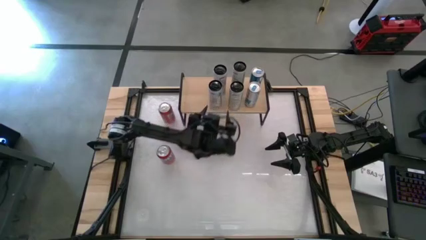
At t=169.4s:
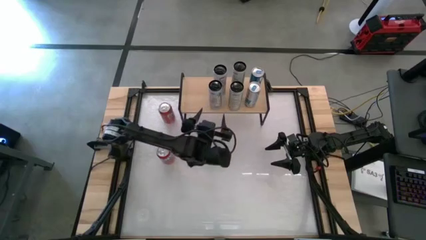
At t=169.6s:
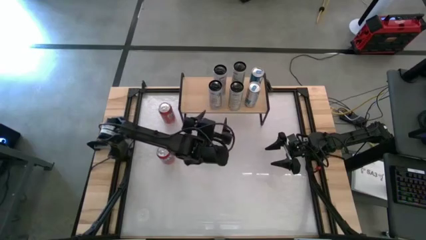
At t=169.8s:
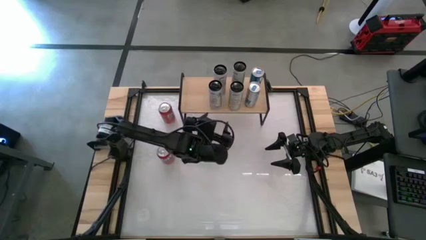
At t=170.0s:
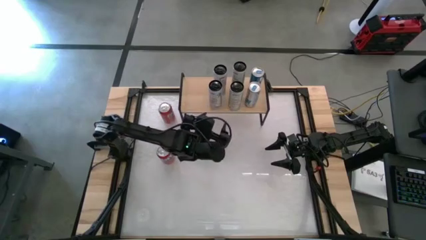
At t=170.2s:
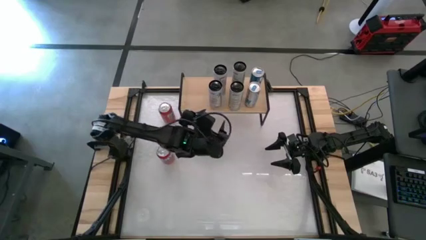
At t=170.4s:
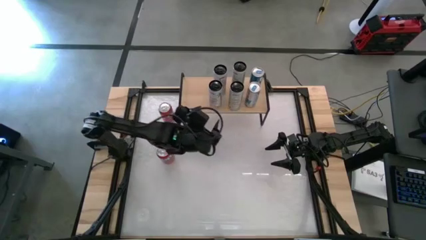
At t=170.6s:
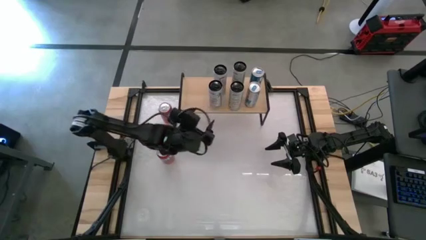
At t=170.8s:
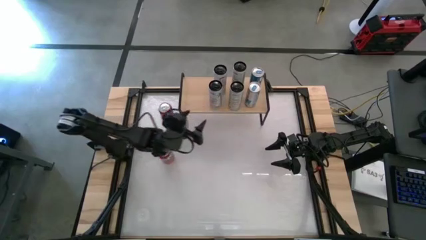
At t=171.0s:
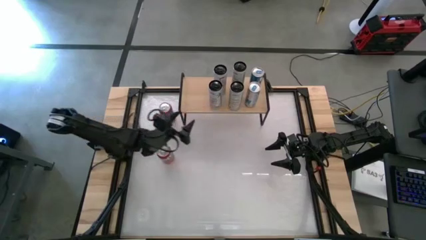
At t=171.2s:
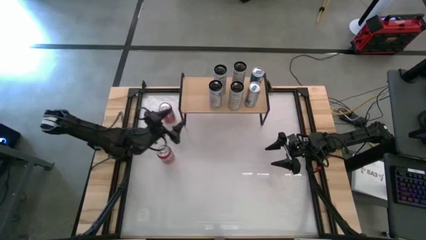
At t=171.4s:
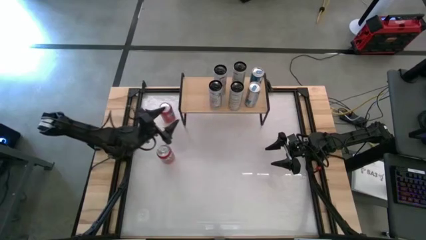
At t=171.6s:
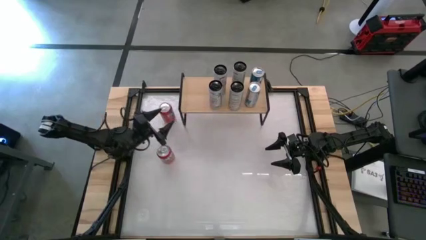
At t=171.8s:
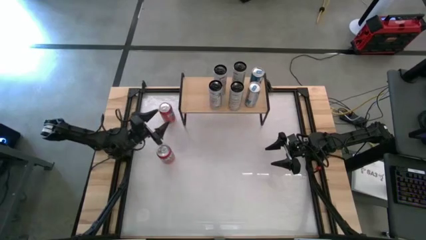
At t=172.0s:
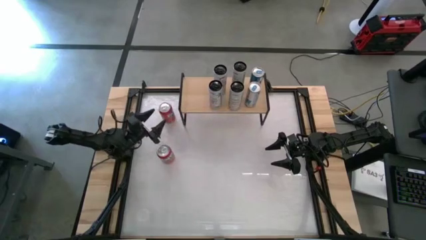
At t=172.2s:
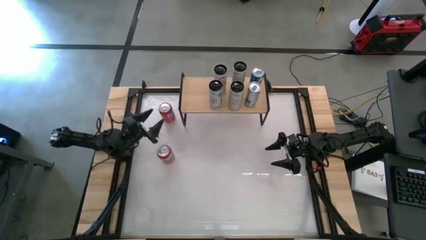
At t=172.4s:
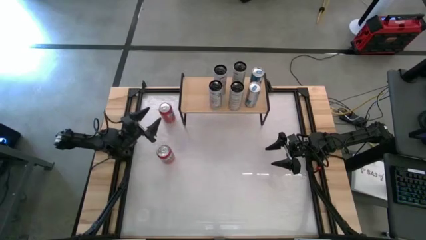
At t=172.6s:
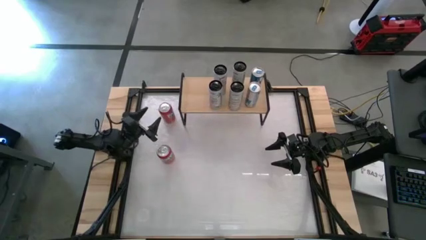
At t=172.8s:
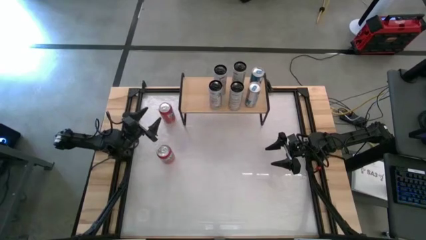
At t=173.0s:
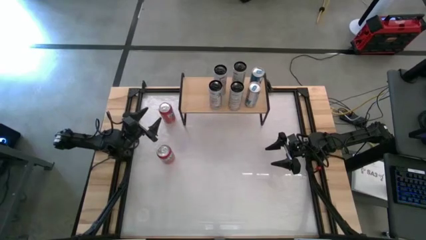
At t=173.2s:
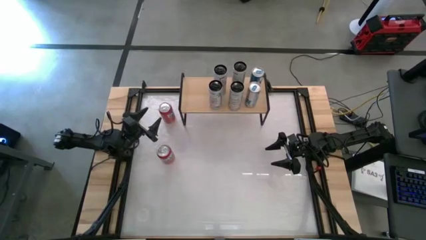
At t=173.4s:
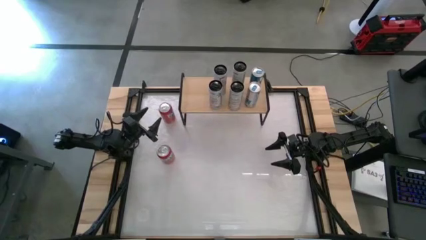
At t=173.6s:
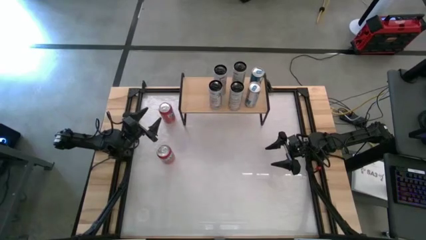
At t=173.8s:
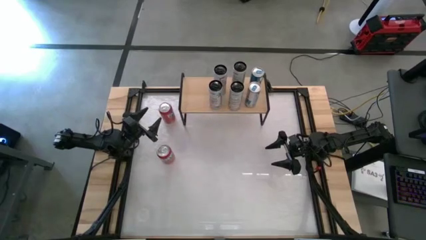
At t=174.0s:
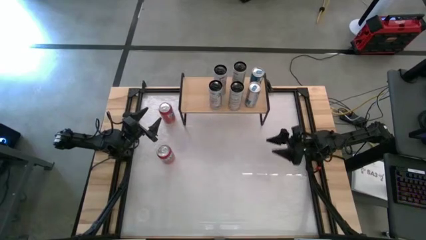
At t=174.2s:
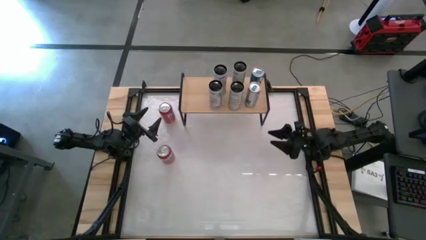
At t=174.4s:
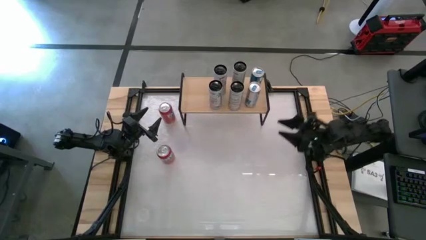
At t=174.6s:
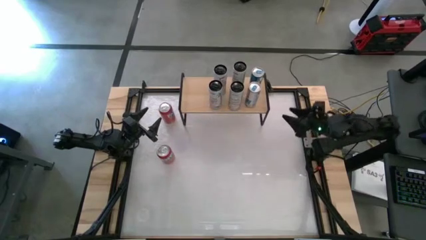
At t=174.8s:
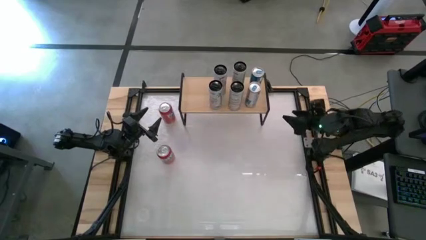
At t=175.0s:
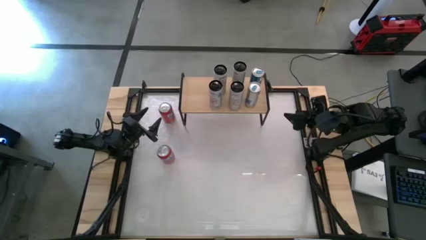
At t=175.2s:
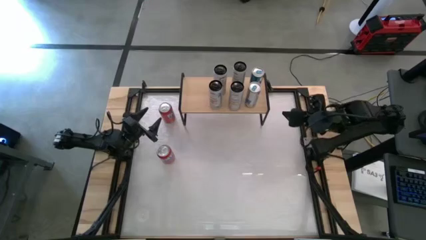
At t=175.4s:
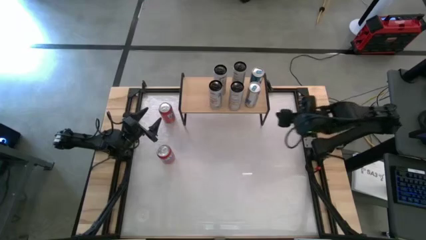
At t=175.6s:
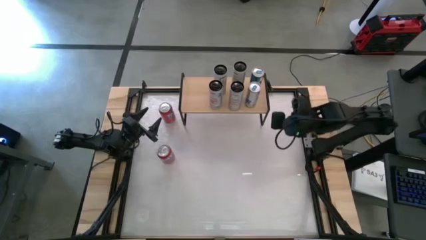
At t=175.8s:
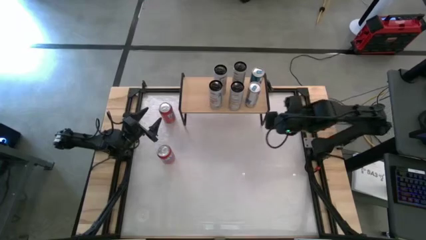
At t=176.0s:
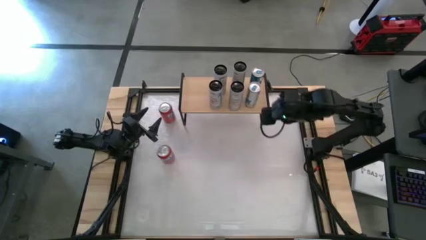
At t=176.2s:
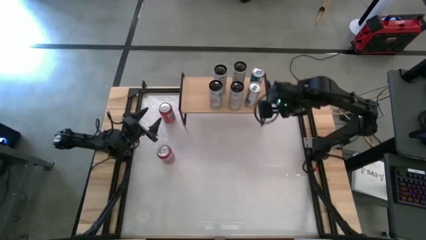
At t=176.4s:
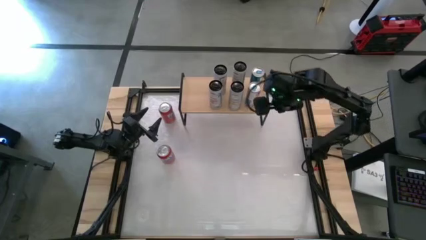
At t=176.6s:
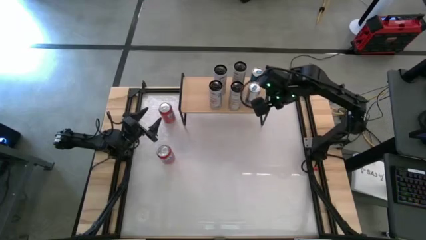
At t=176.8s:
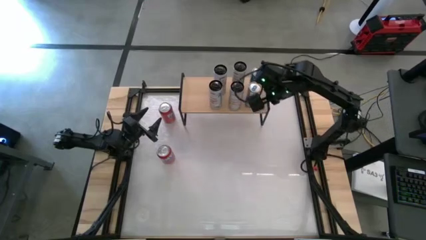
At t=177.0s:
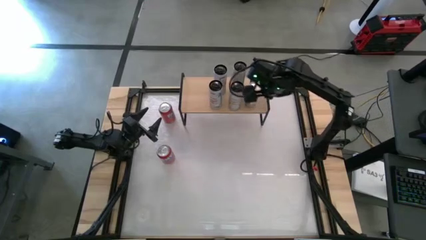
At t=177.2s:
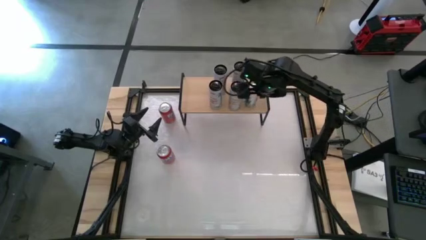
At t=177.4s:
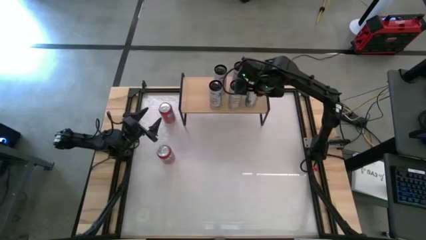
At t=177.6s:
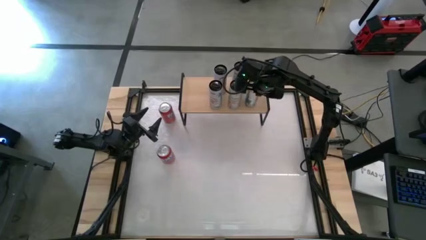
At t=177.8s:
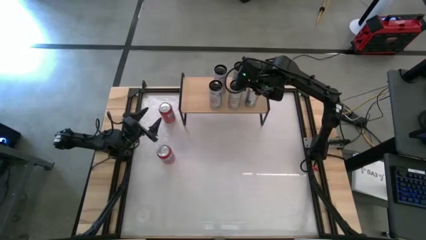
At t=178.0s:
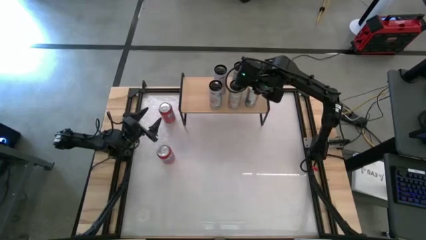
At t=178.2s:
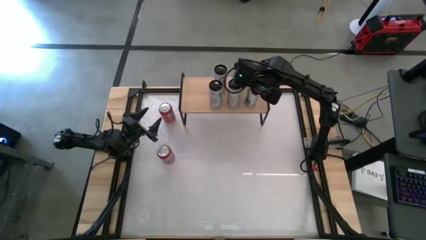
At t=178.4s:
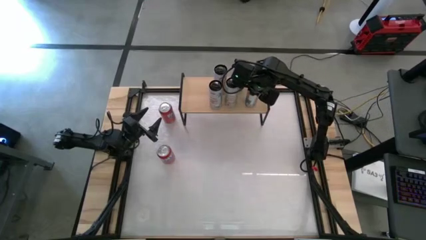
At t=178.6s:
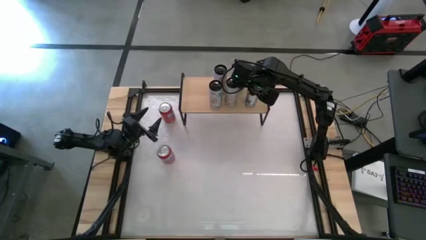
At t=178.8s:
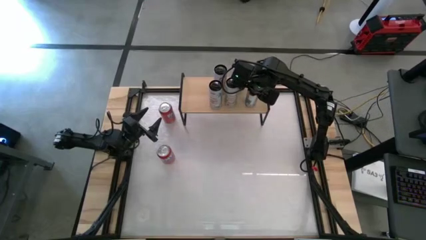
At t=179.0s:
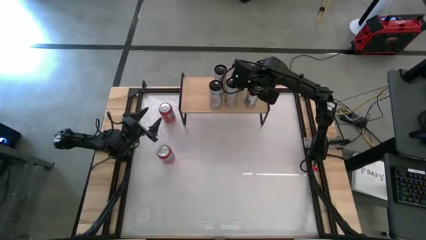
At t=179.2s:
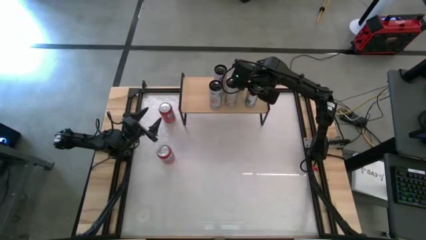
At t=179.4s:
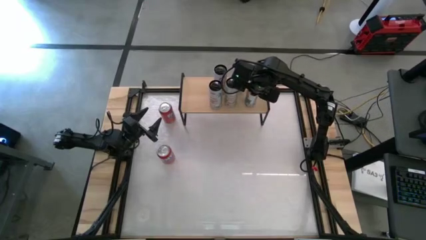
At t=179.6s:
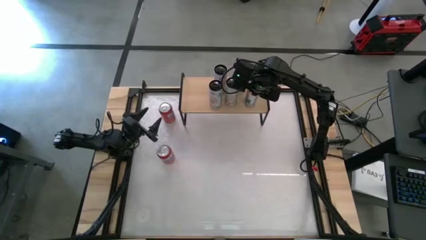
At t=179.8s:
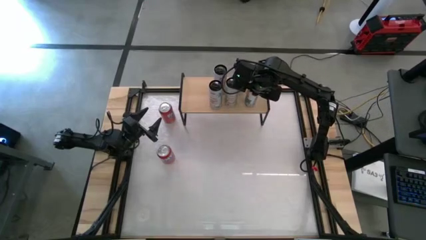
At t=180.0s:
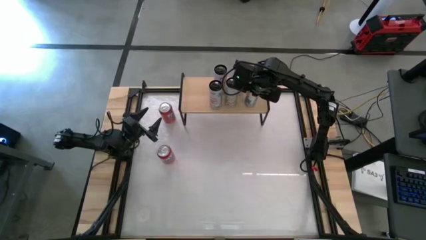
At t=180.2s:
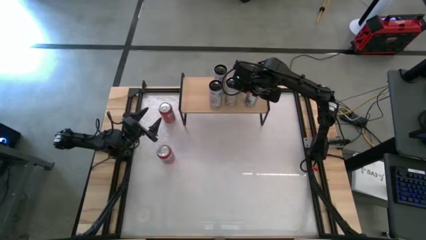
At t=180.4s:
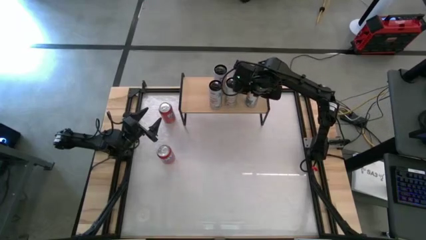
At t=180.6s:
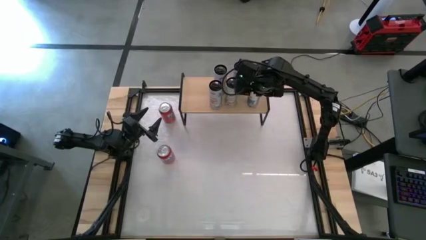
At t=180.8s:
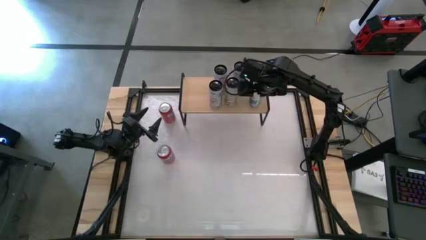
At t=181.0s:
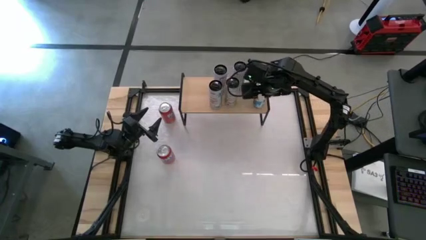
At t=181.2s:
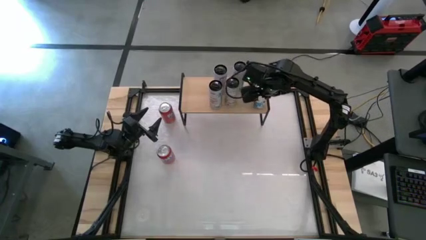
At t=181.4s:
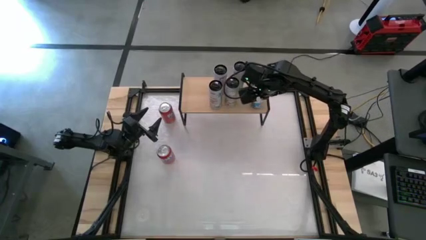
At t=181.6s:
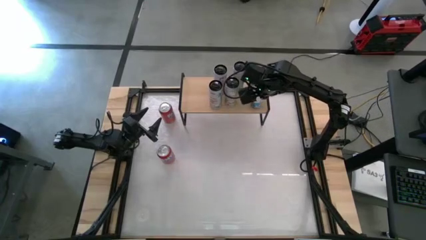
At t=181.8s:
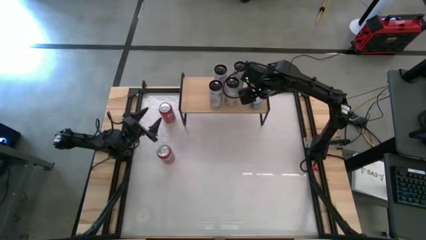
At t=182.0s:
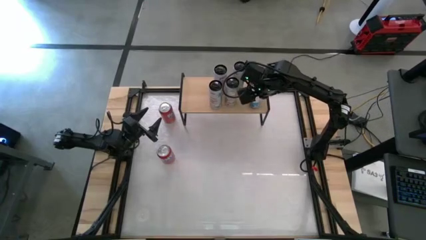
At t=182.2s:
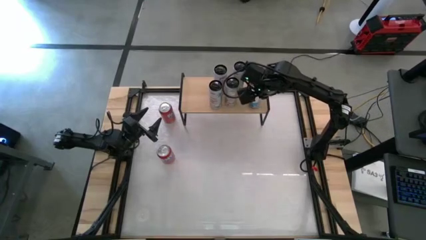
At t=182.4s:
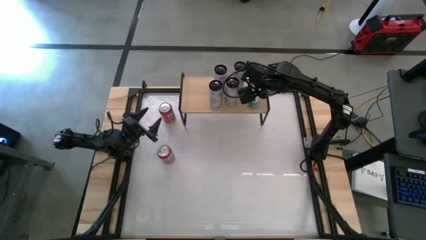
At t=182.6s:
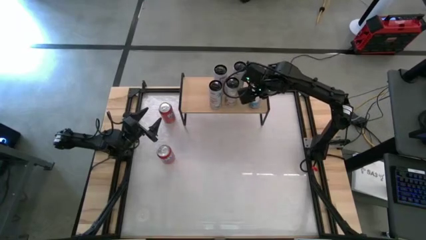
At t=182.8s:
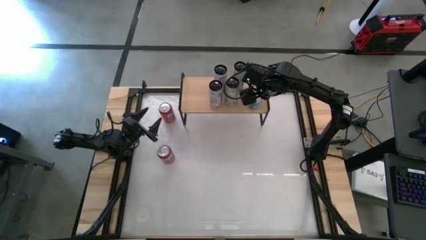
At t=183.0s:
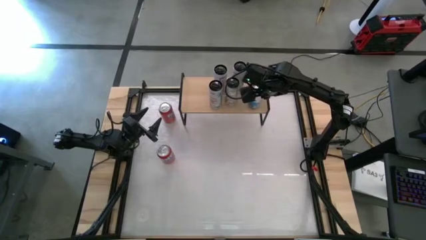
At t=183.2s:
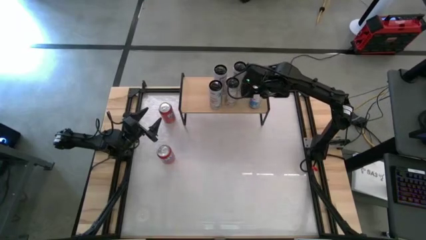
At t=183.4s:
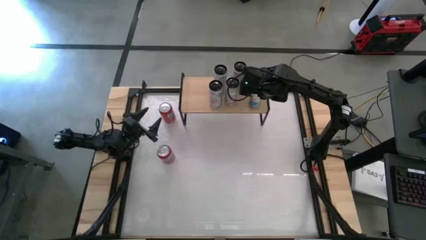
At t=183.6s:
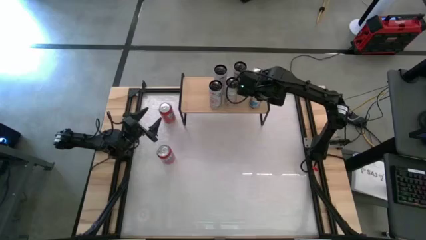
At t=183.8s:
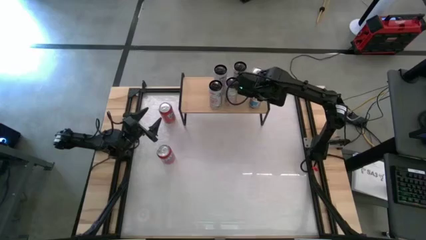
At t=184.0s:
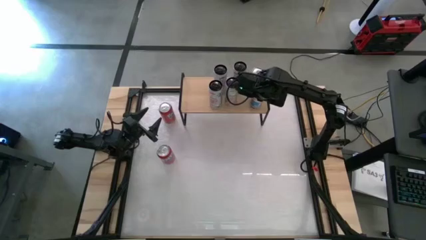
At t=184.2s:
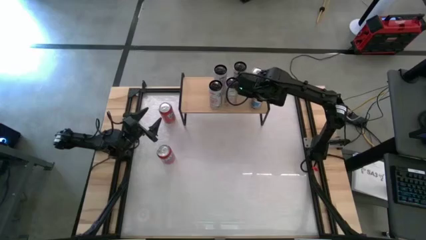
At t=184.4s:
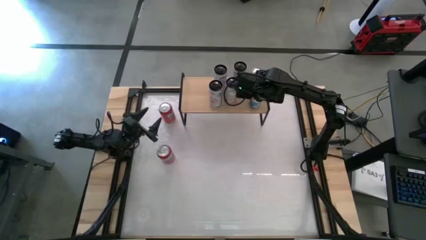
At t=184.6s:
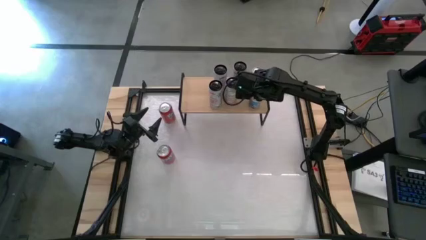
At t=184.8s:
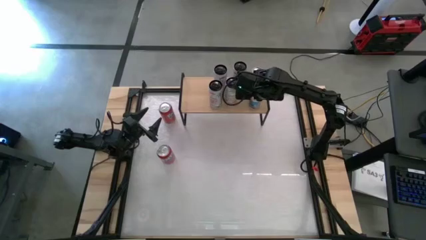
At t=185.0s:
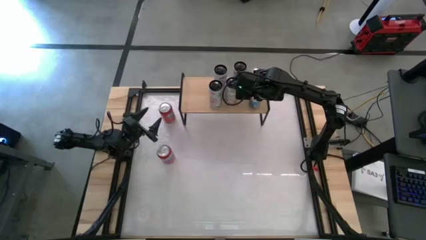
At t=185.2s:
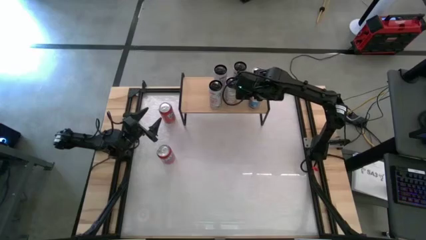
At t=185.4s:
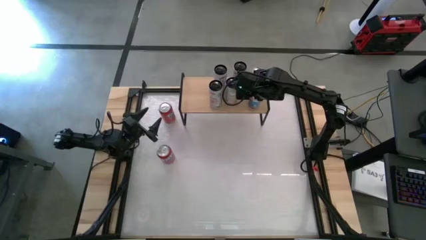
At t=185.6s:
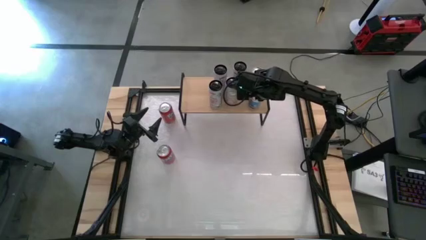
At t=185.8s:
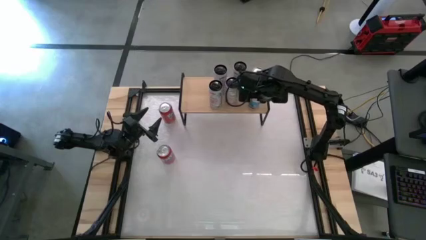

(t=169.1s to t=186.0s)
Task: Place canned beverage on shelf
Adjust the blue soda can
